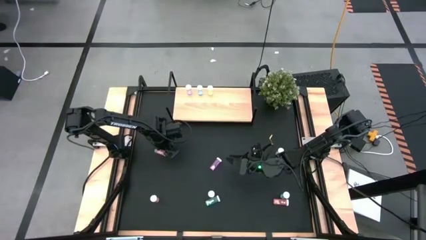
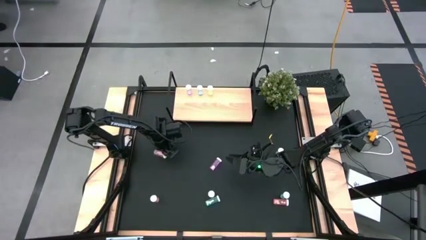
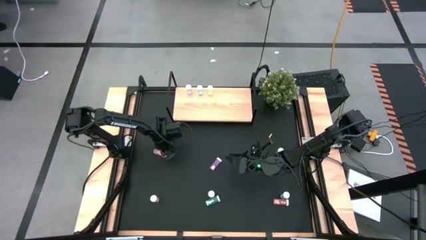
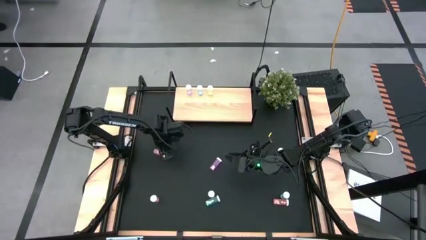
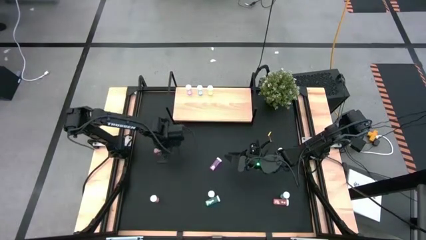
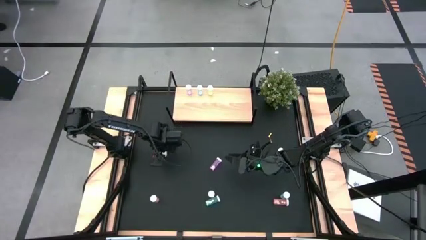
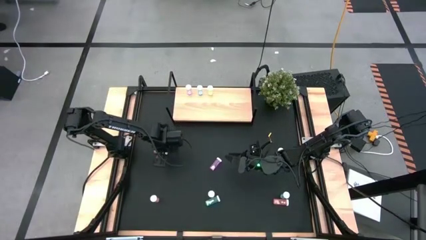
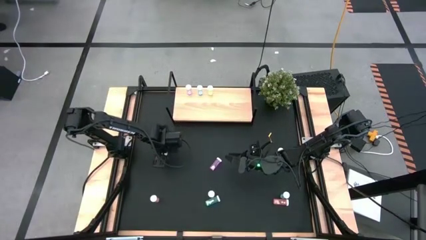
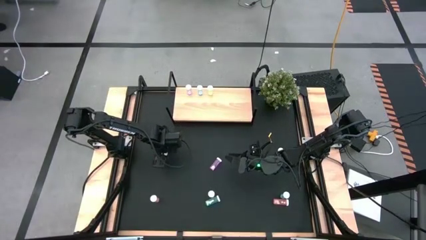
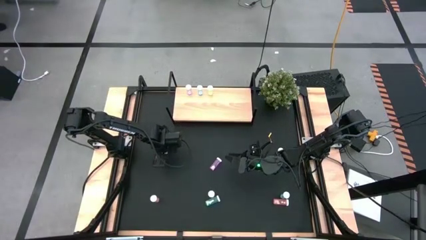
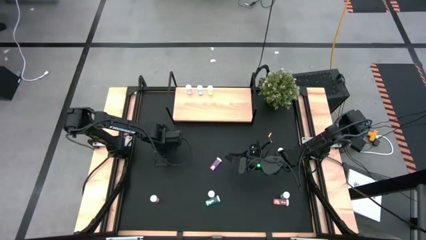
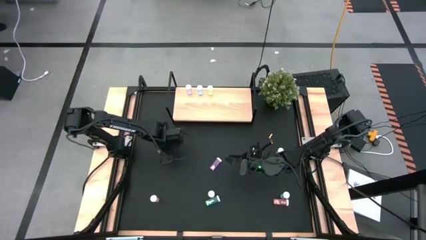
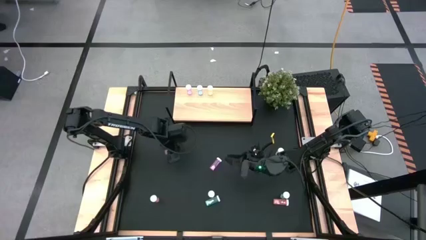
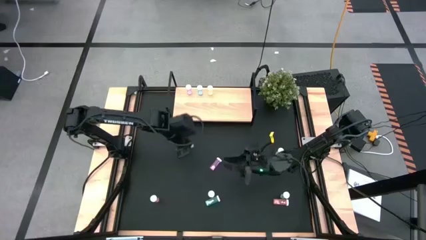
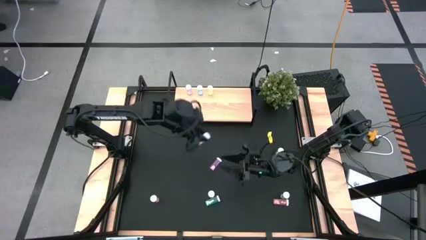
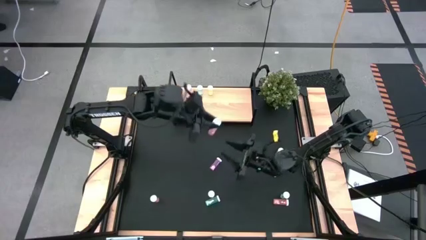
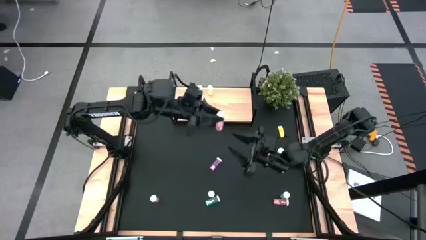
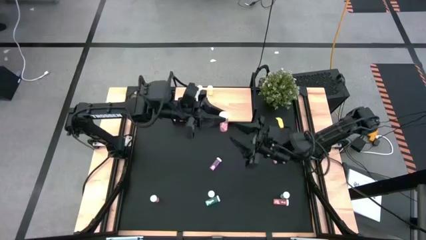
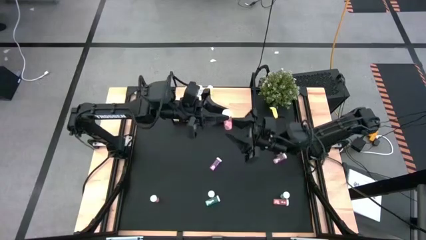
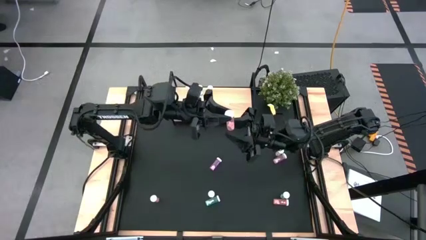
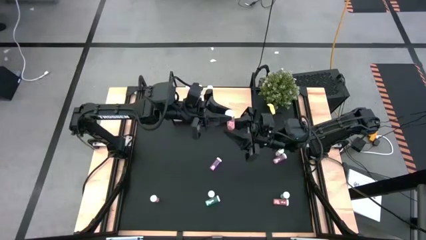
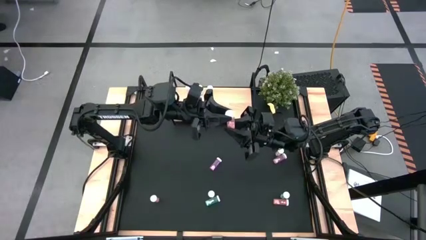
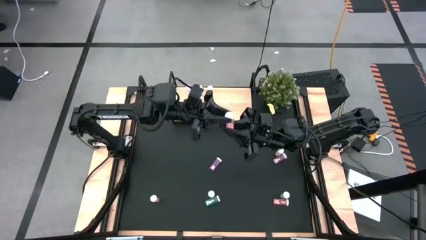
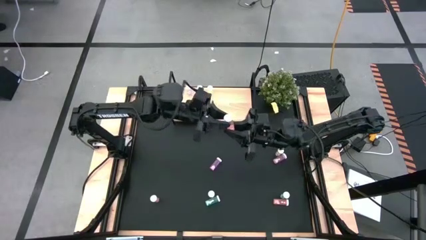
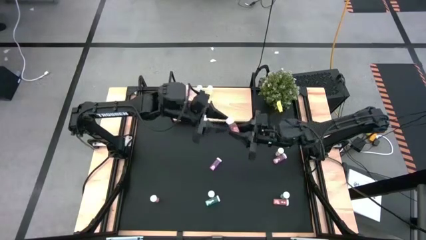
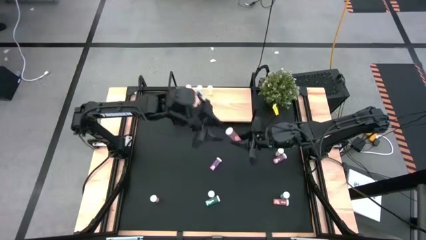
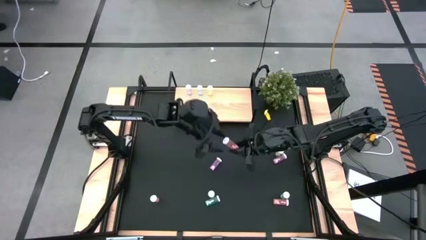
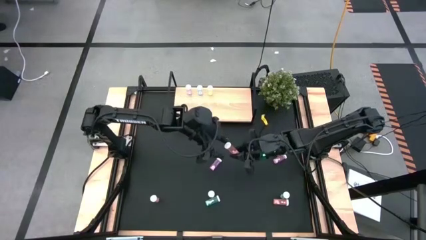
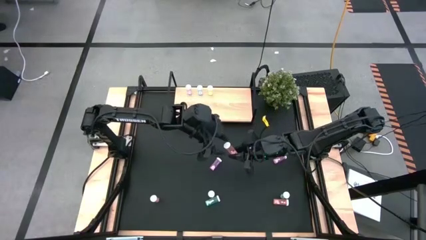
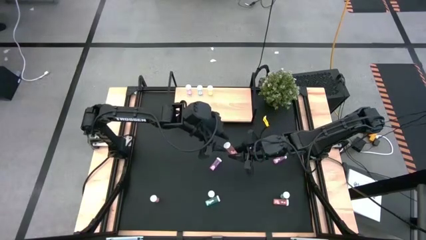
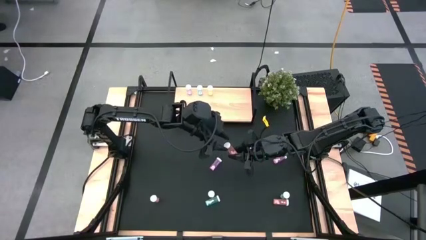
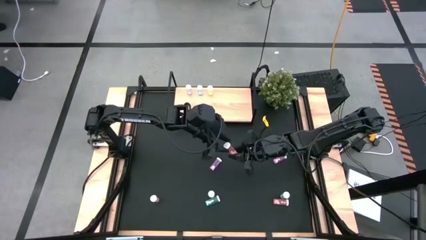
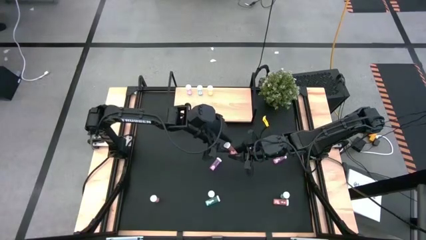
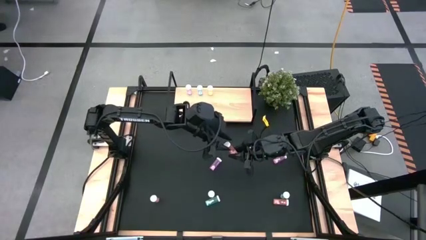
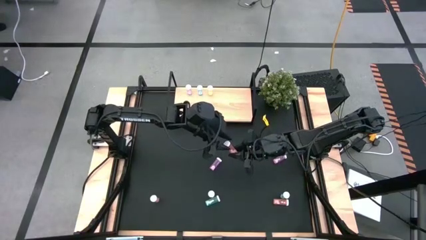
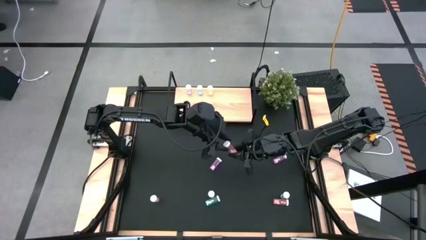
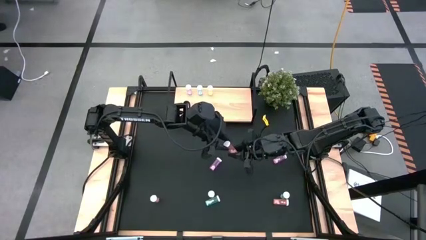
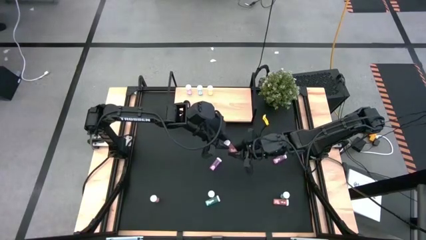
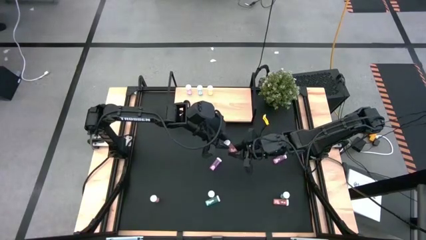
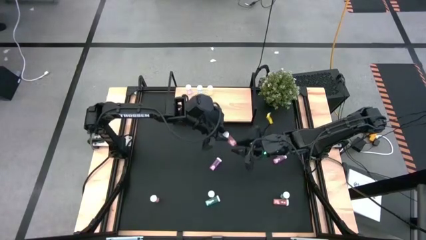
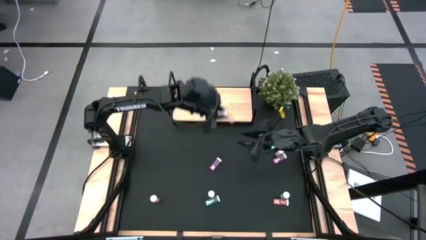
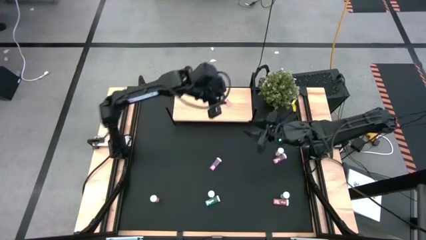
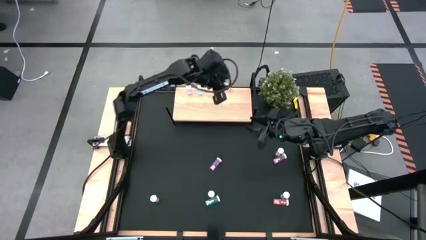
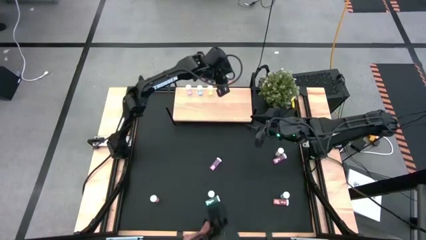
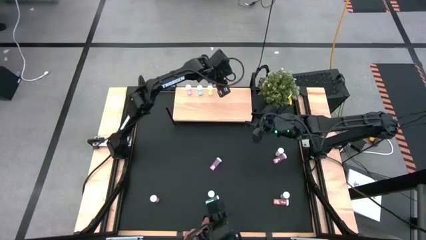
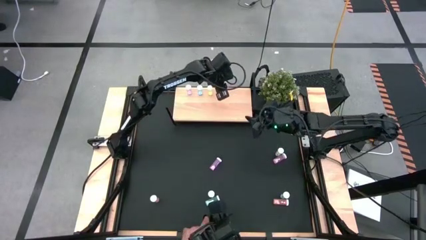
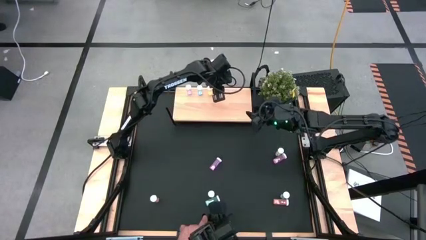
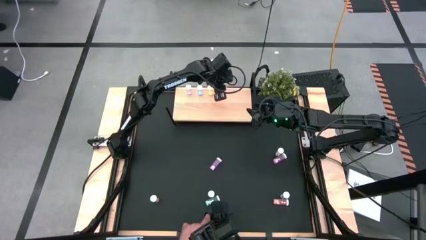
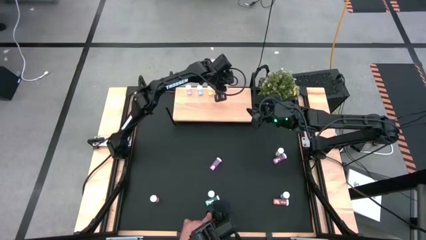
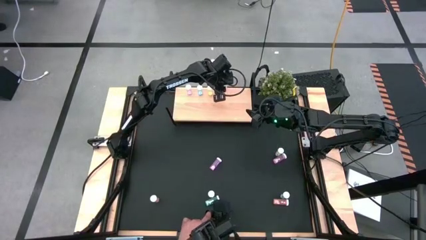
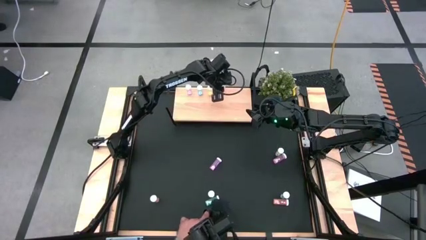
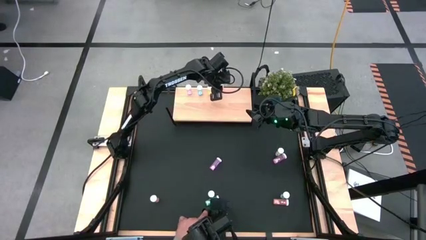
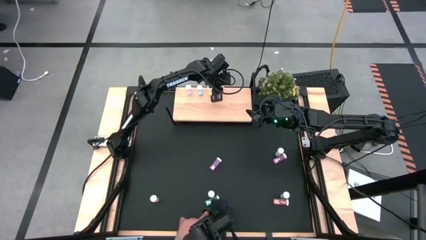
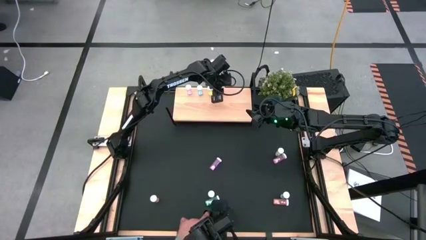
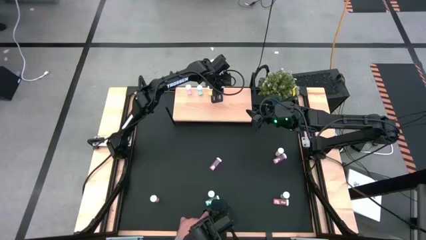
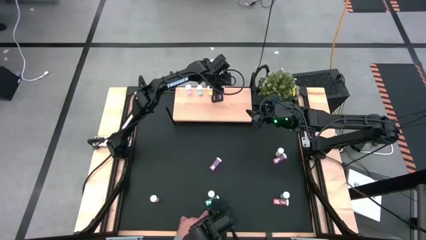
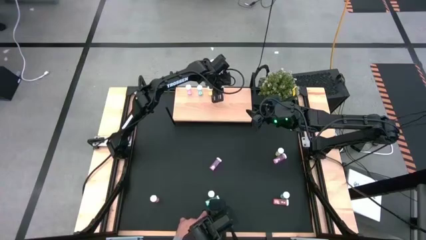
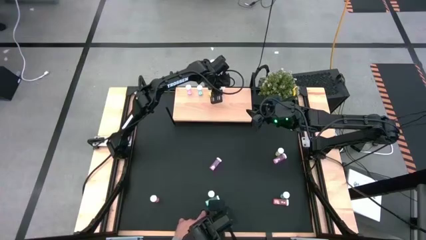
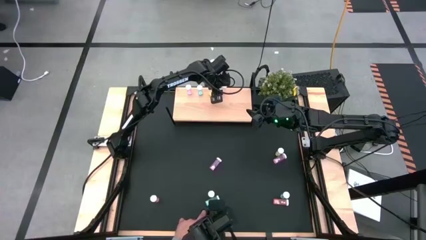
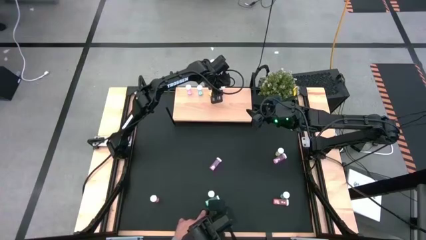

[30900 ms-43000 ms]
Task: Pick and place medicine bottles onto shelf by color
Put the top left red medicine bottle on the shelf

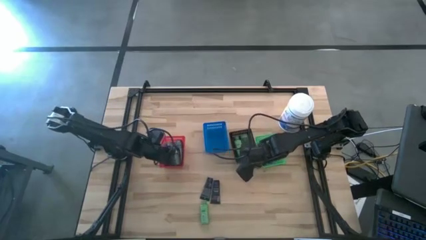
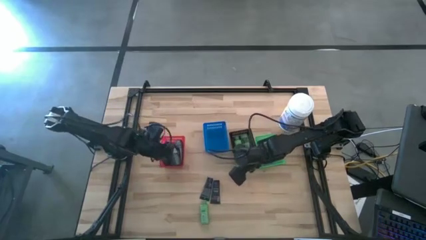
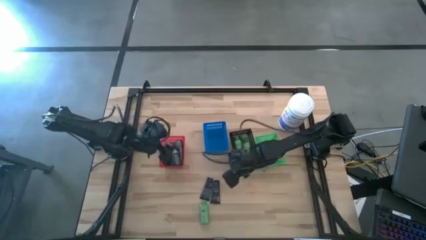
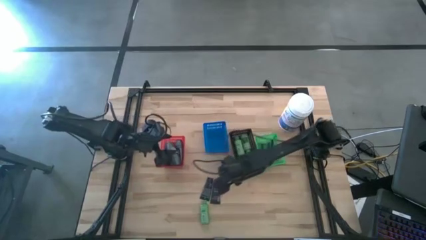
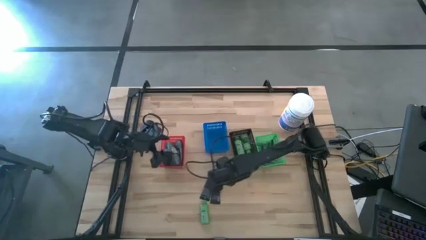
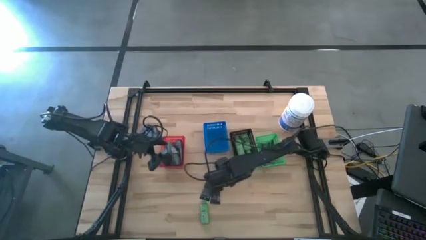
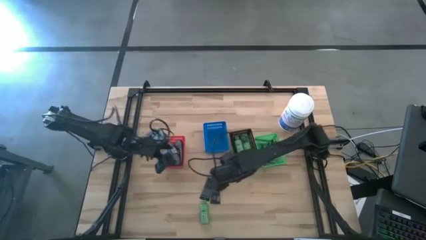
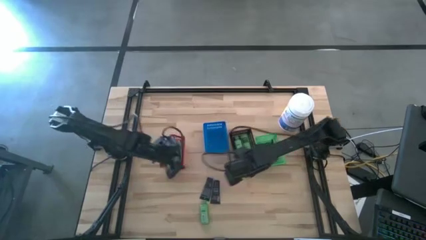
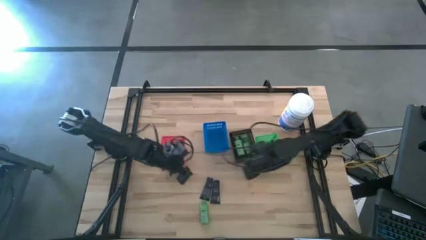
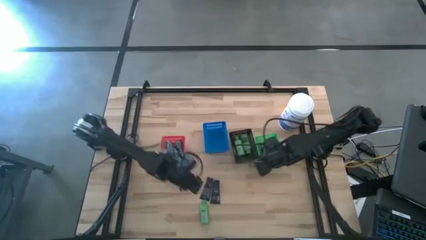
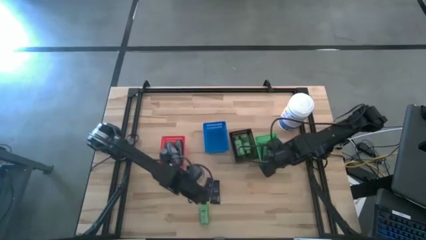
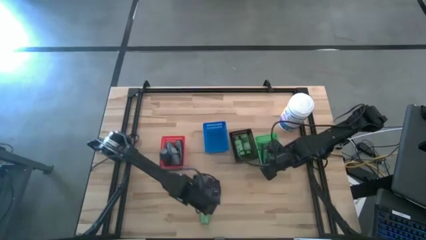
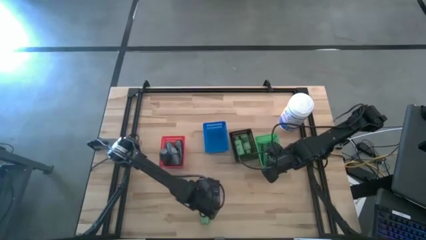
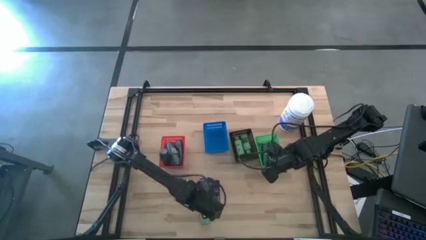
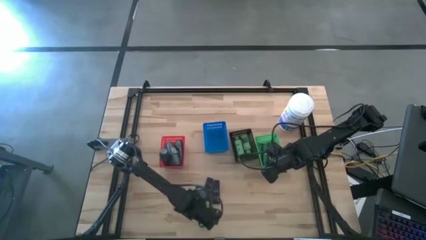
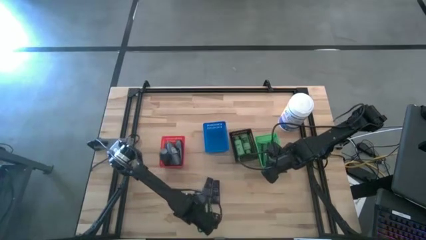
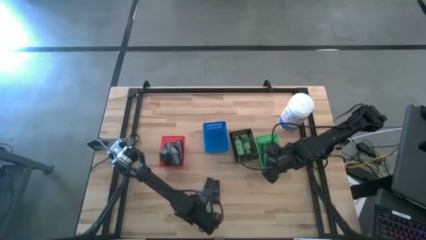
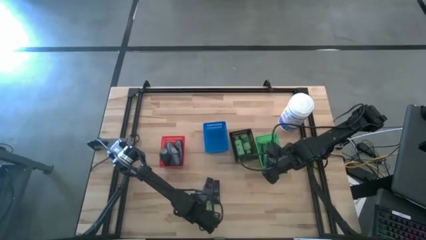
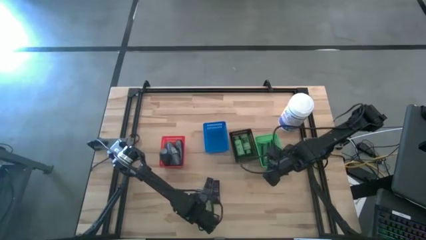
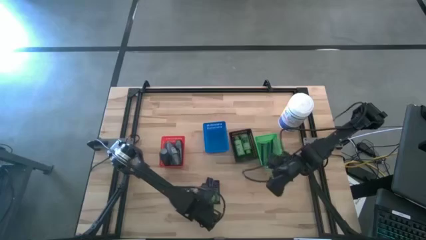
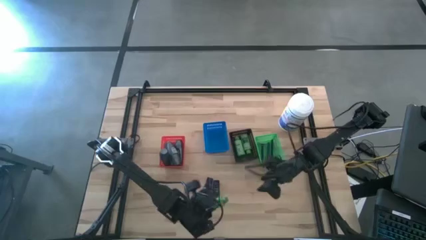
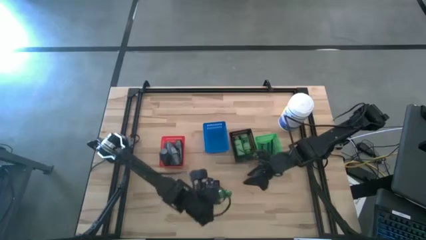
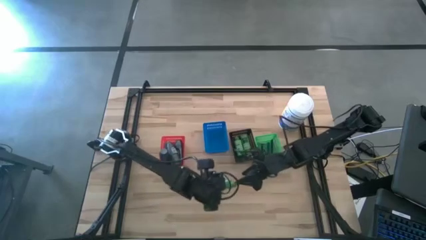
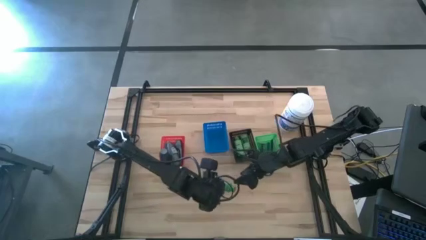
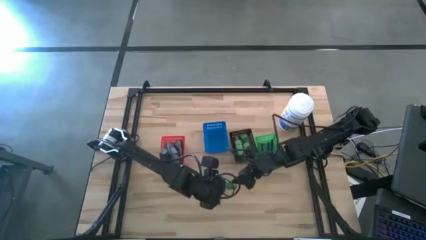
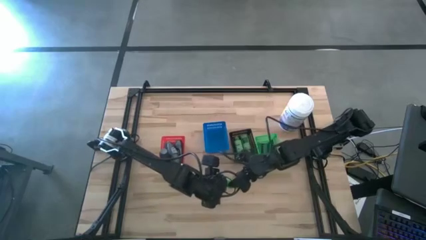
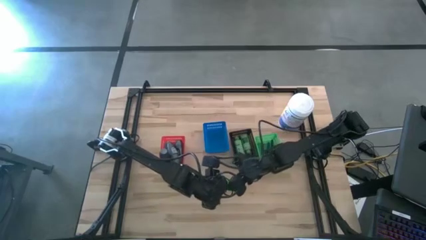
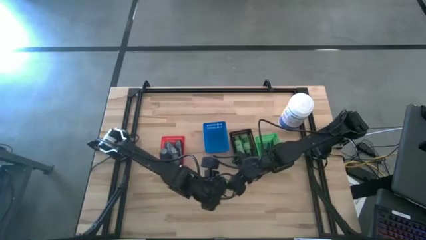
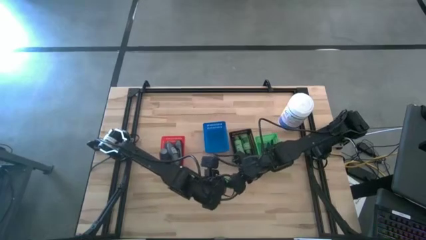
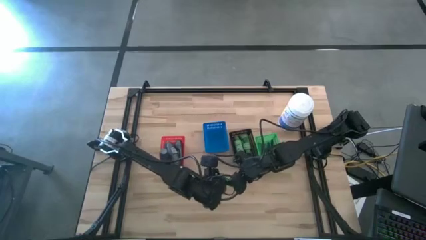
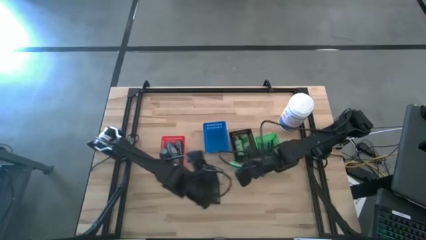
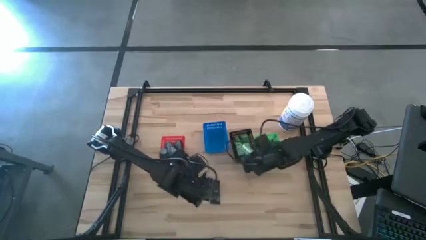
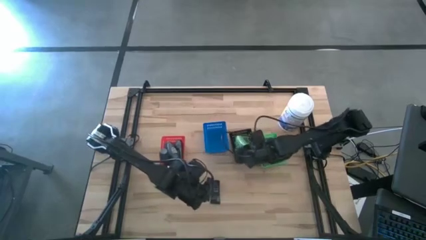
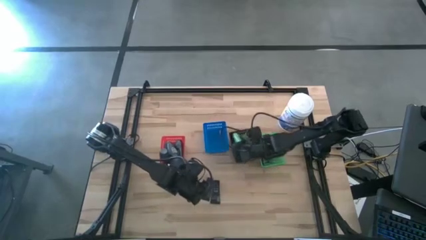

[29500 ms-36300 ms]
Task: Pick & Place Travel size toiletries
Put the green shampoo into the black bin
